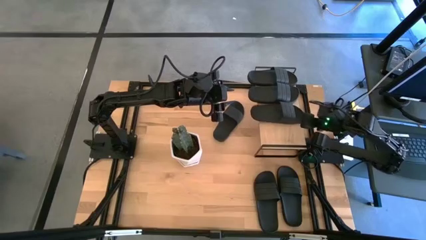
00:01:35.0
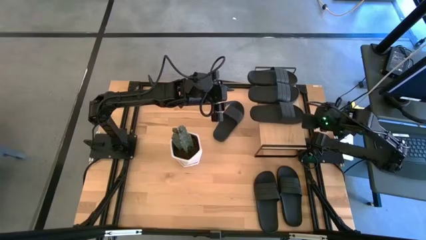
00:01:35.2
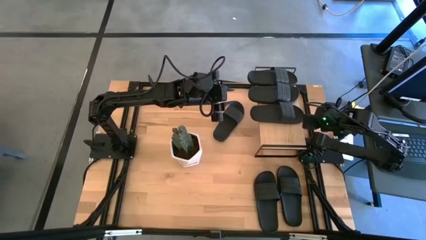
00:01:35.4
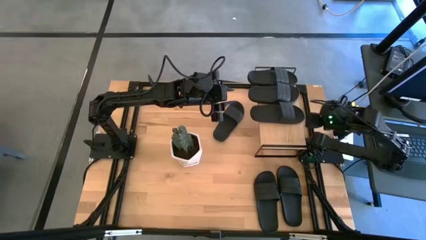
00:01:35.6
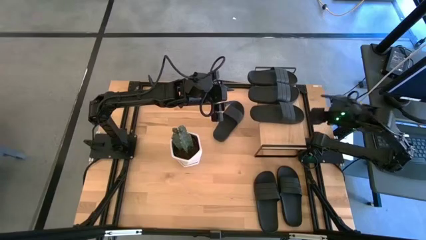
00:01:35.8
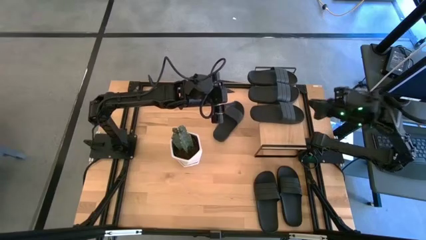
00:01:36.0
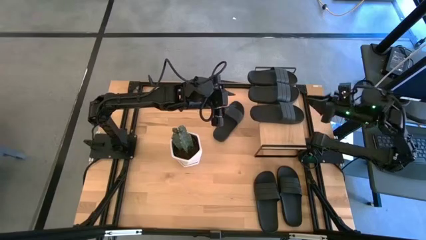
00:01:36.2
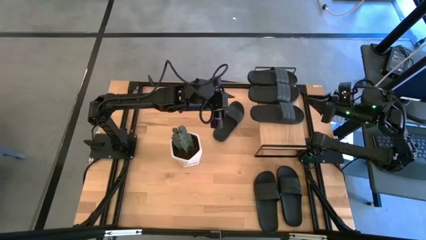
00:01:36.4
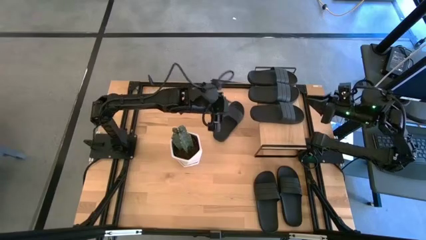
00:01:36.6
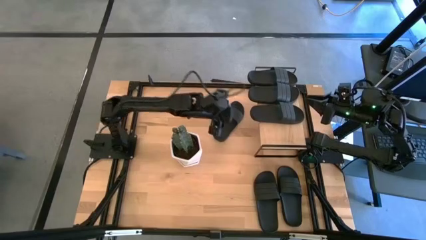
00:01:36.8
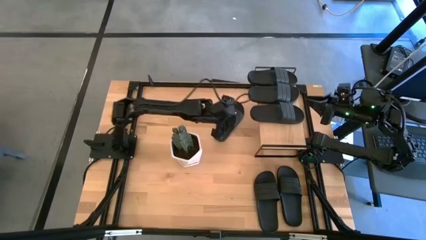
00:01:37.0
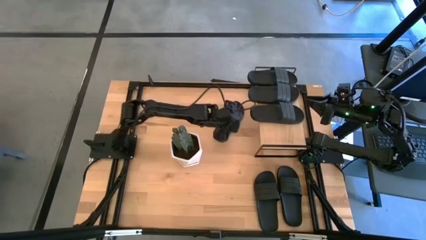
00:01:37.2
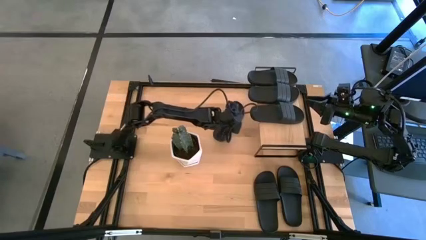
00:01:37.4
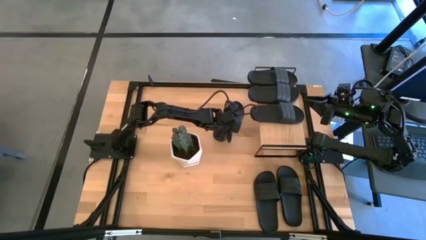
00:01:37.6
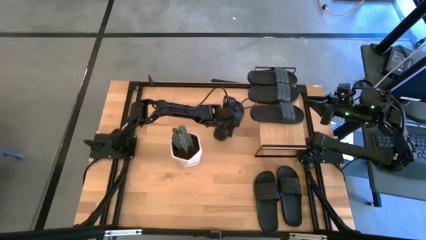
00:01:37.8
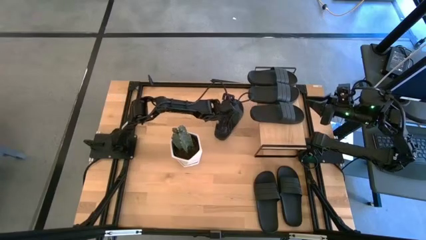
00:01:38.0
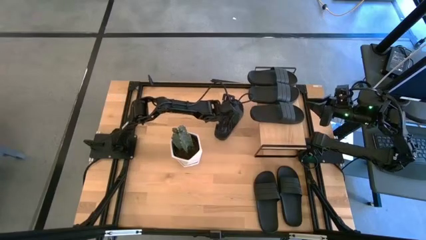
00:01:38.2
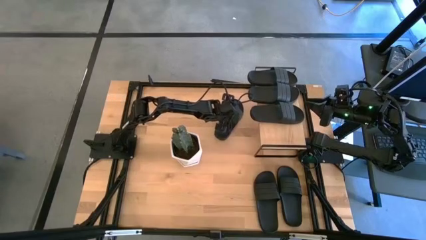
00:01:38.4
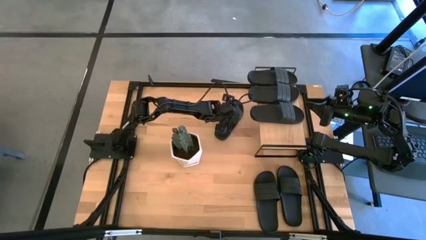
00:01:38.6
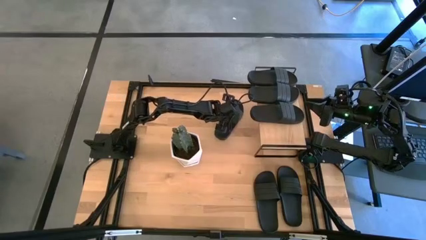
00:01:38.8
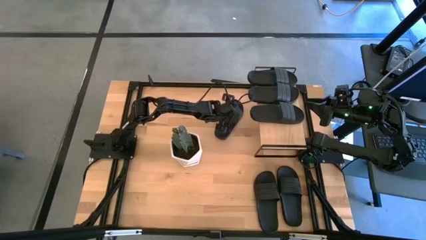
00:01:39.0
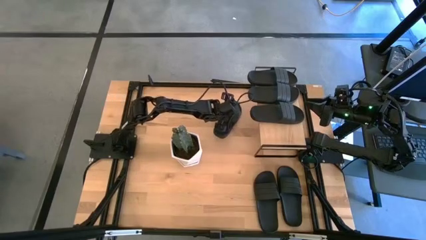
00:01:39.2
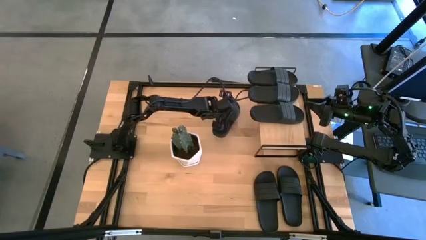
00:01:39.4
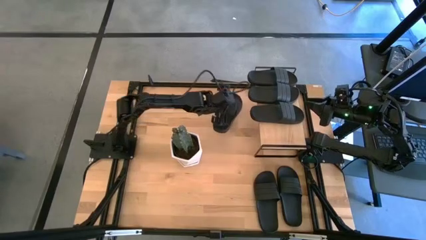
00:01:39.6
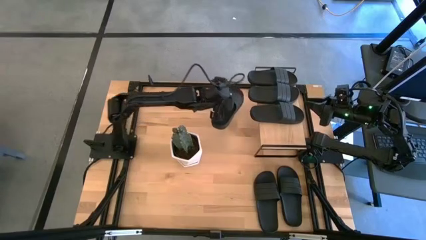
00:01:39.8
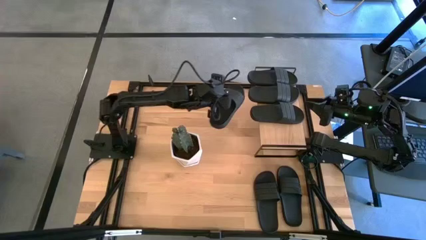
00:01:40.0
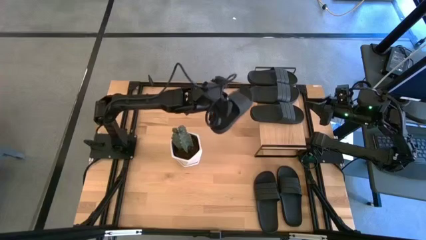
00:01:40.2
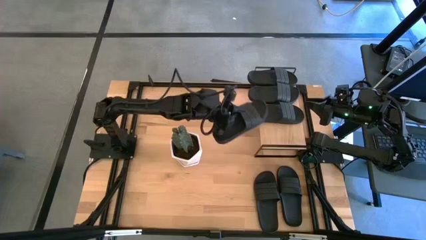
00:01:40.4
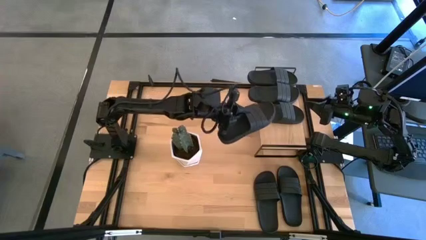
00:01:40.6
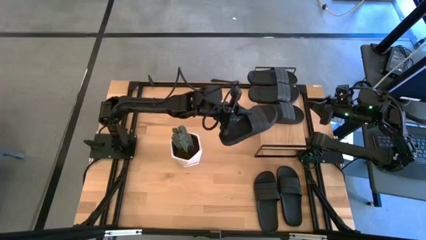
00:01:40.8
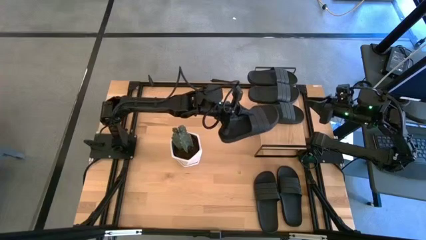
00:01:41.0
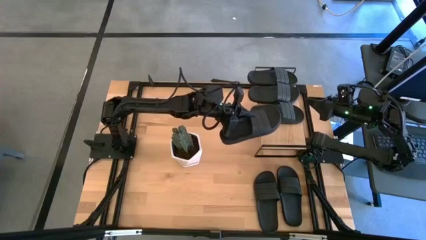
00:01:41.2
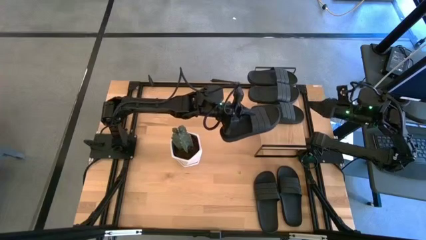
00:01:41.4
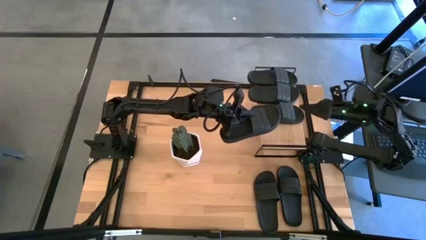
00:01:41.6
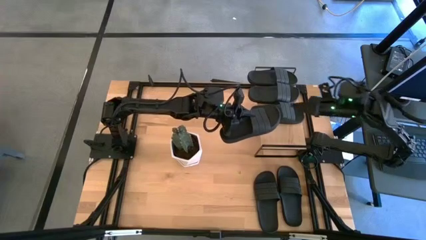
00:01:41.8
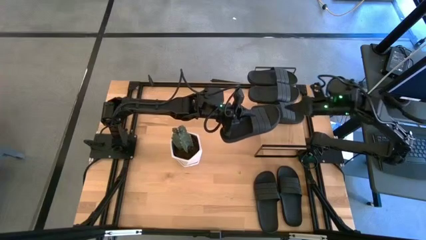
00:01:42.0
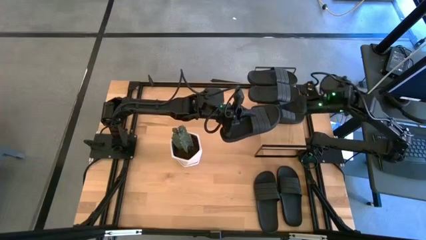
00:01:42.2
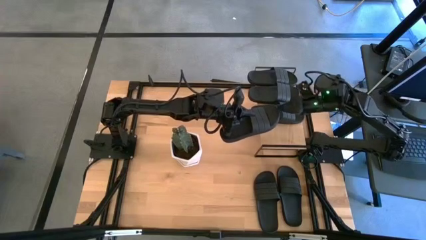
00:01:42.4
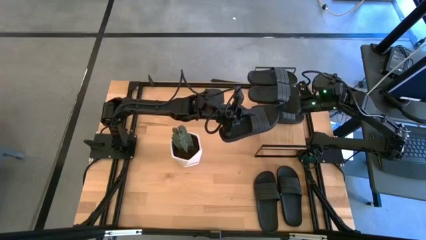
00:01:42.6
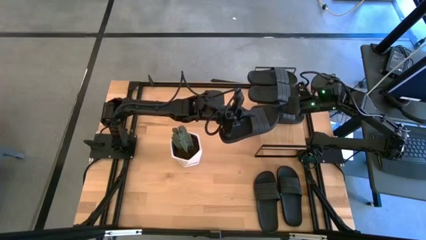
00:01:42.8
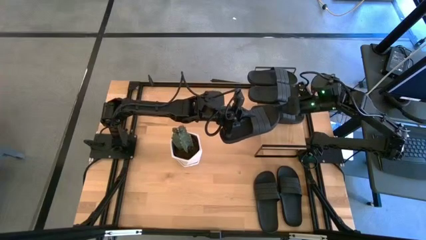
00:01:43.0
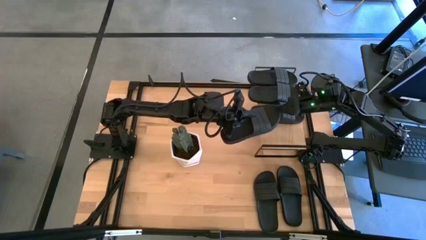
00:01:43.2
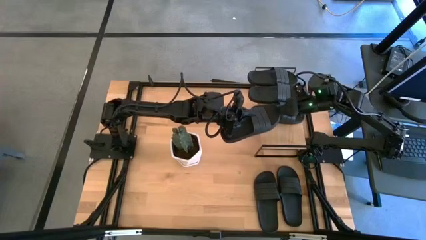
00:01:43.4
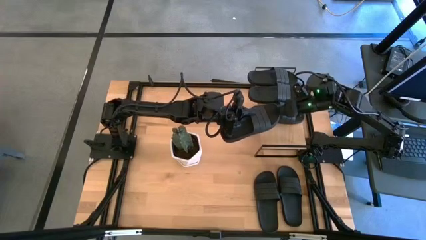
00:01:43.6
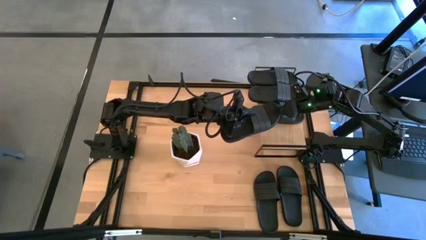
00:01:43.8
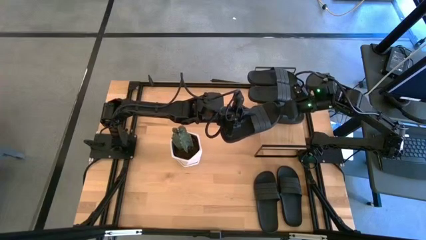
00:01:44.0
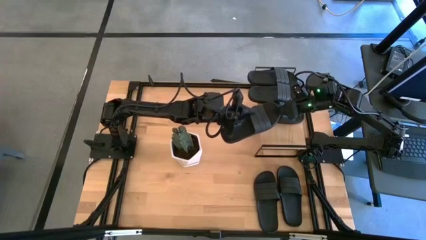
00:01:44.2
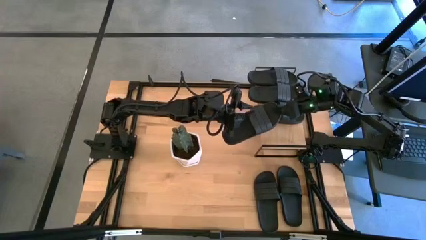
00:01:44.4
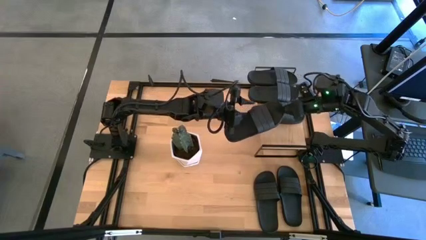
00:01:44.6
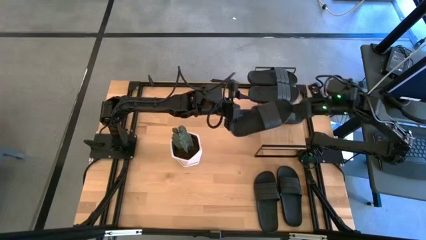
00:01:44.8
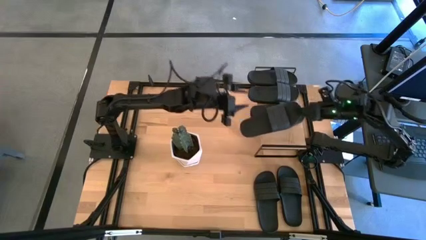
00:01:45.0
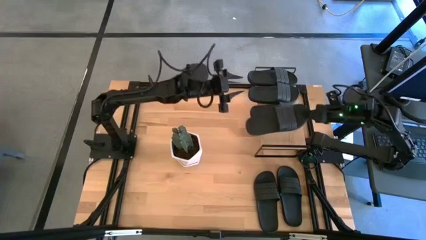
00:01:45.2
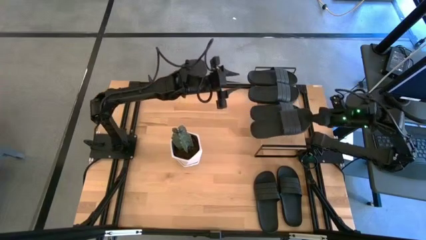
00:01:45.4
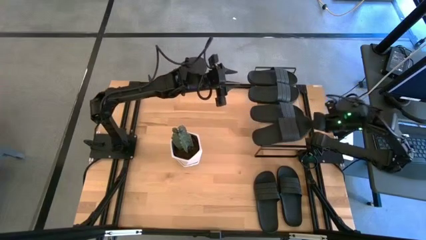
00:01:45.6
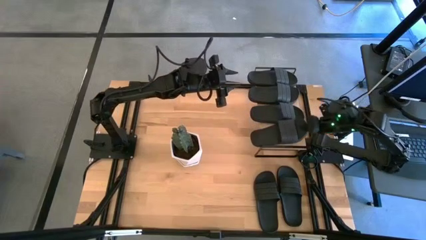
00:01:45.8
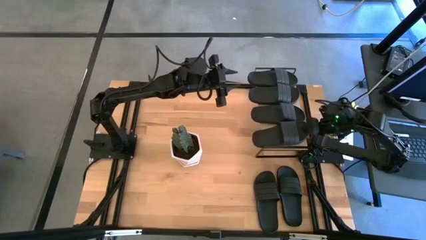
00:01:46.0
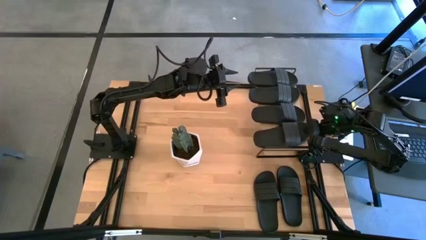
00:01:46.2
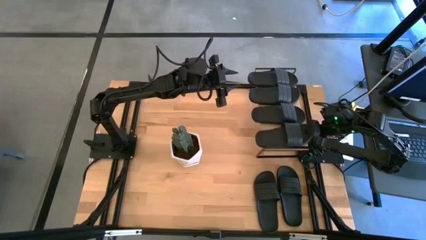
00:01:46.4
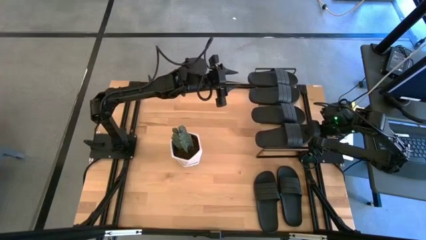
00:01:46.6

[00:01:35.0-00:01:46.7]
Task: Pick and place slides into the shelf
Put the black slide on the shelf
